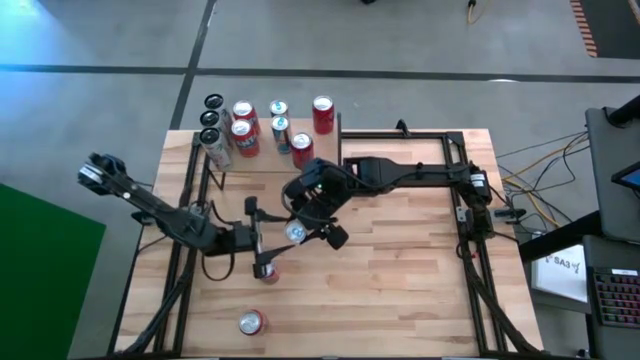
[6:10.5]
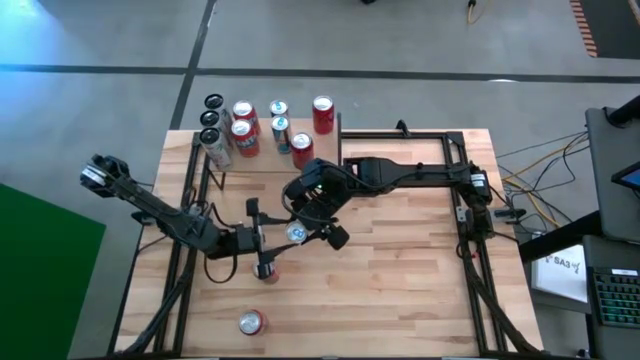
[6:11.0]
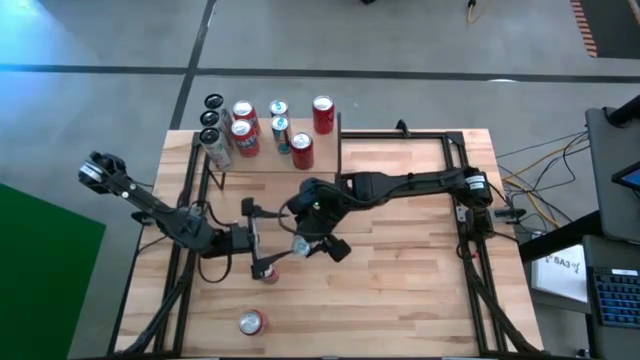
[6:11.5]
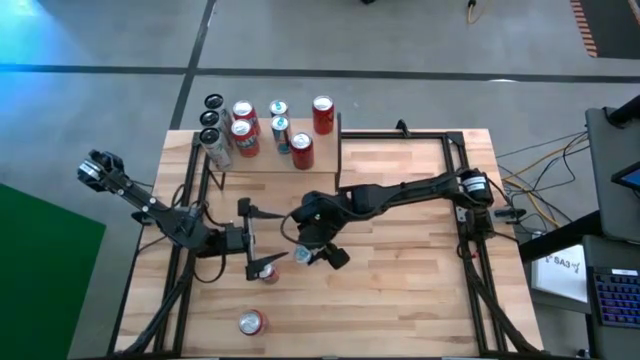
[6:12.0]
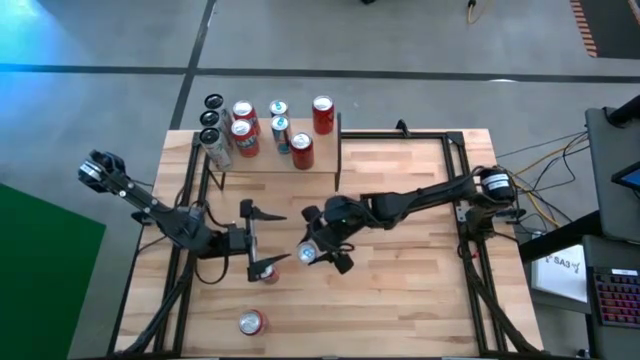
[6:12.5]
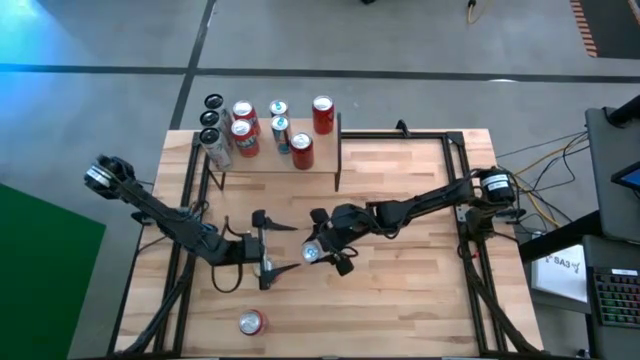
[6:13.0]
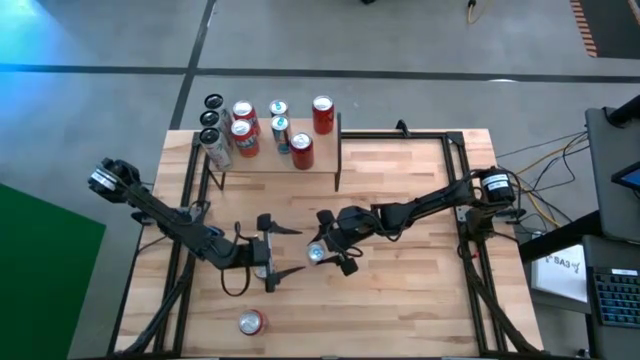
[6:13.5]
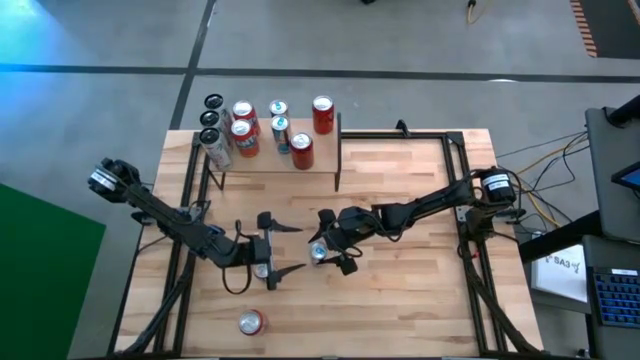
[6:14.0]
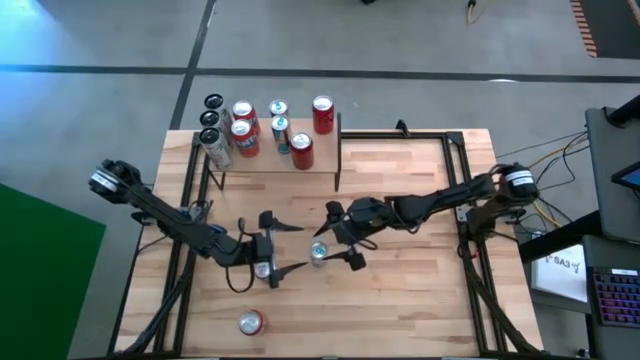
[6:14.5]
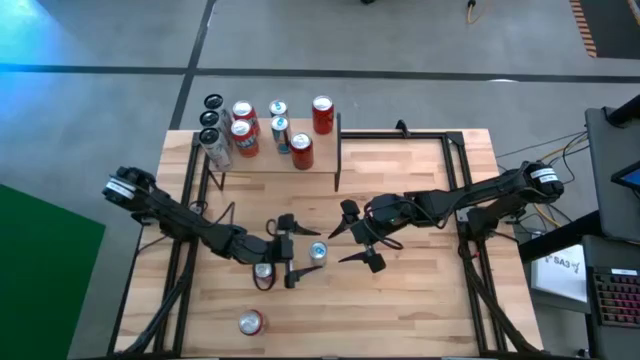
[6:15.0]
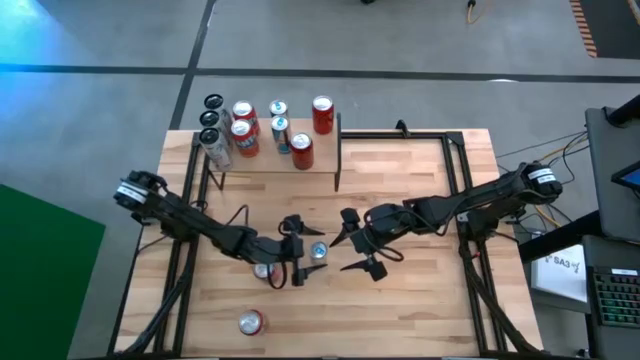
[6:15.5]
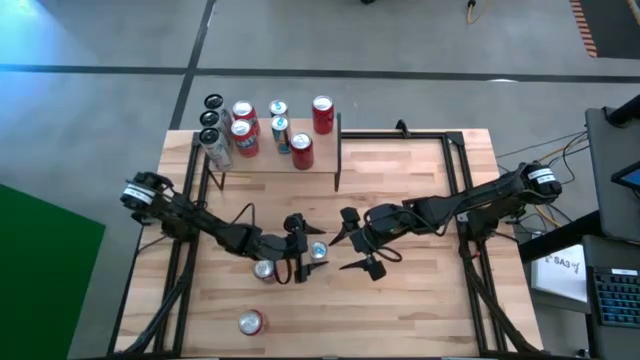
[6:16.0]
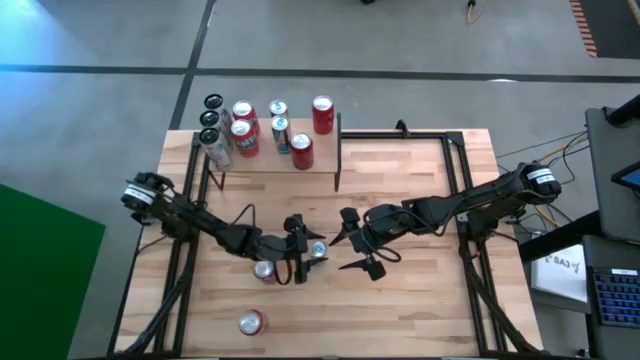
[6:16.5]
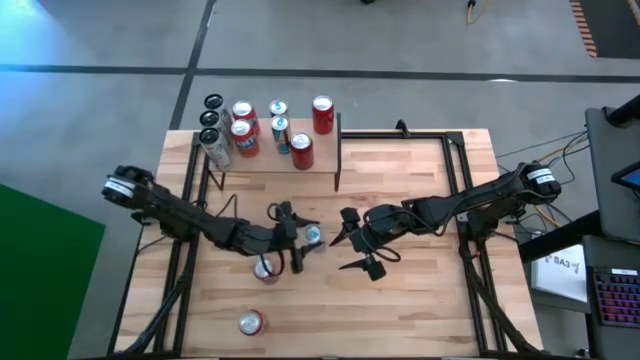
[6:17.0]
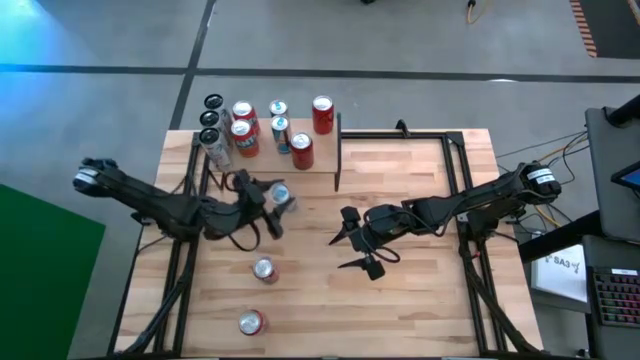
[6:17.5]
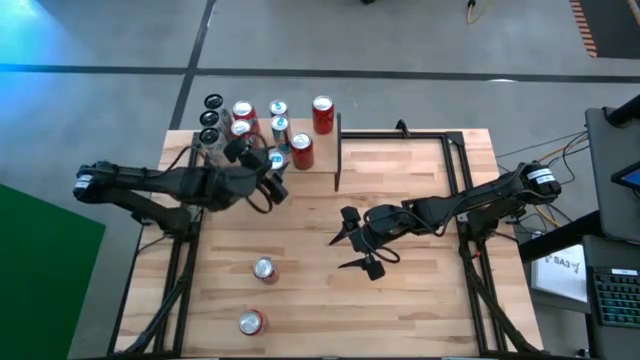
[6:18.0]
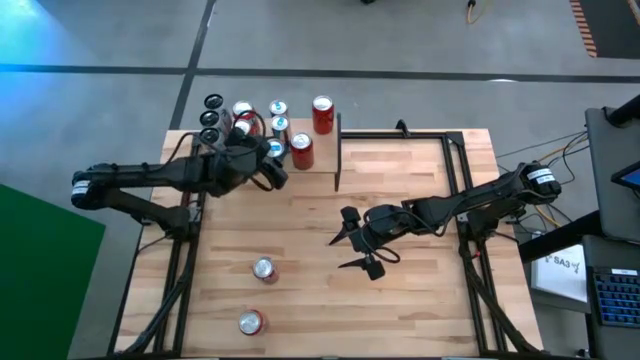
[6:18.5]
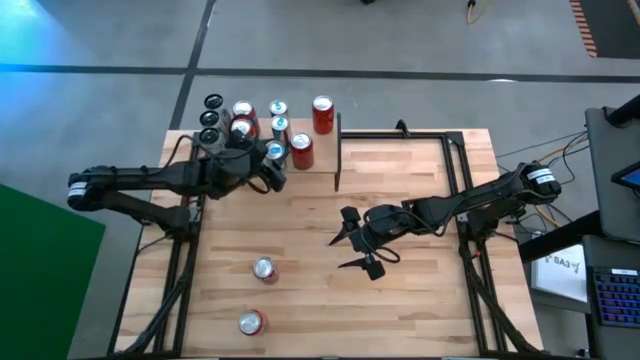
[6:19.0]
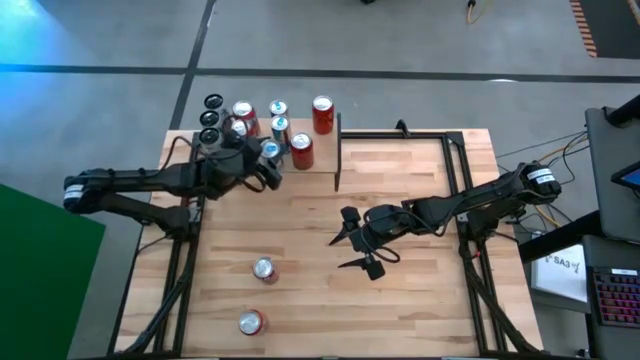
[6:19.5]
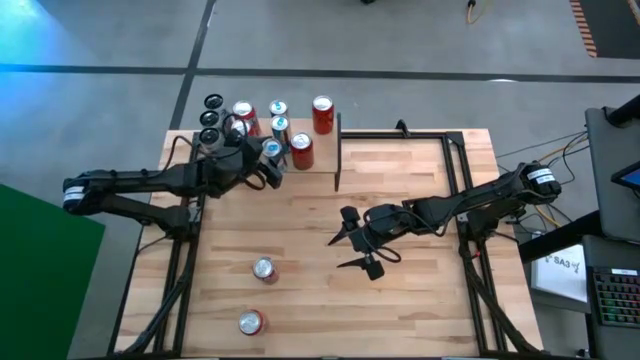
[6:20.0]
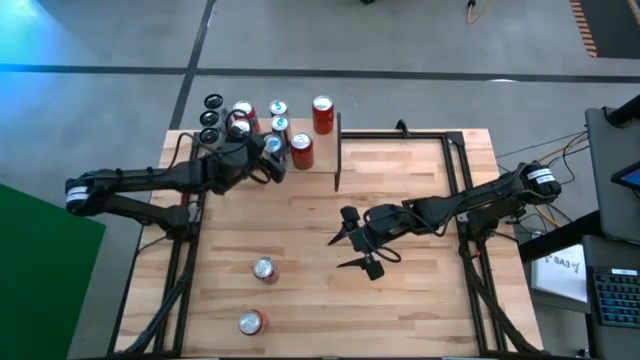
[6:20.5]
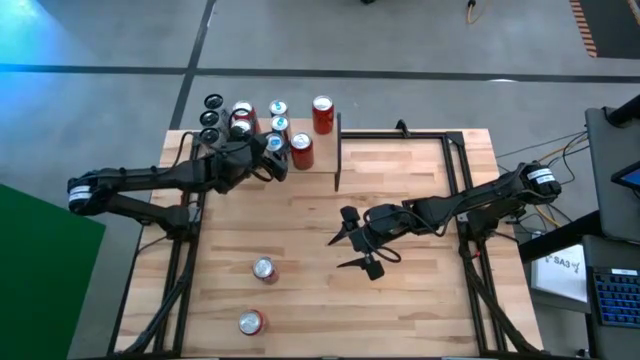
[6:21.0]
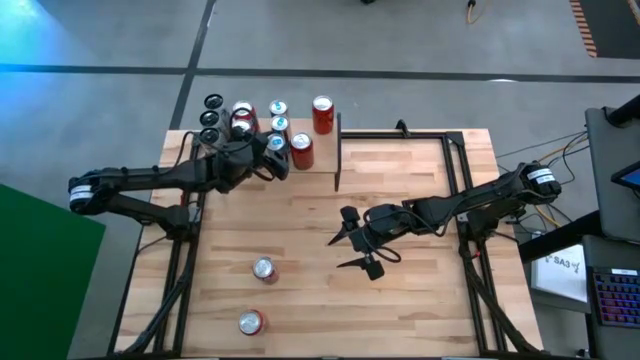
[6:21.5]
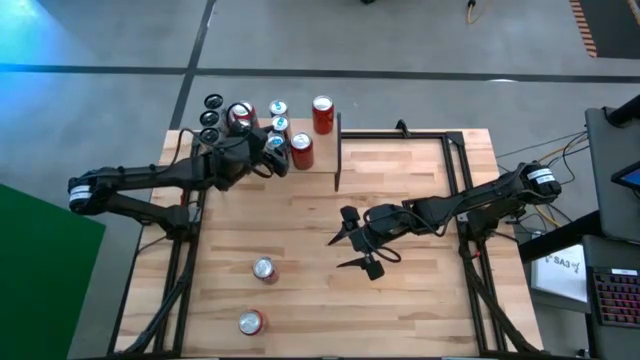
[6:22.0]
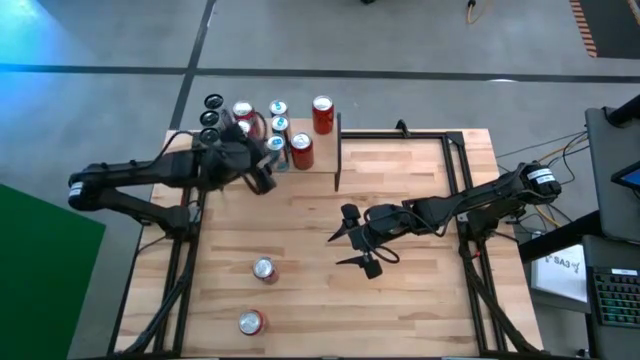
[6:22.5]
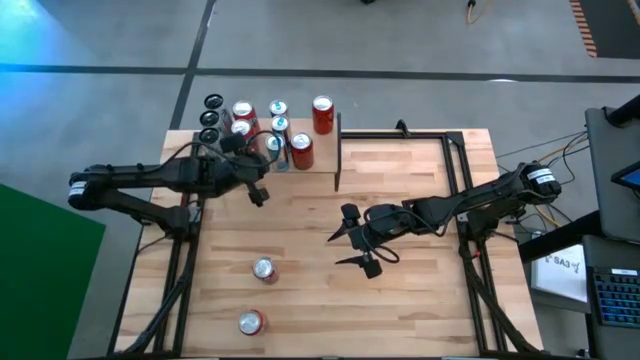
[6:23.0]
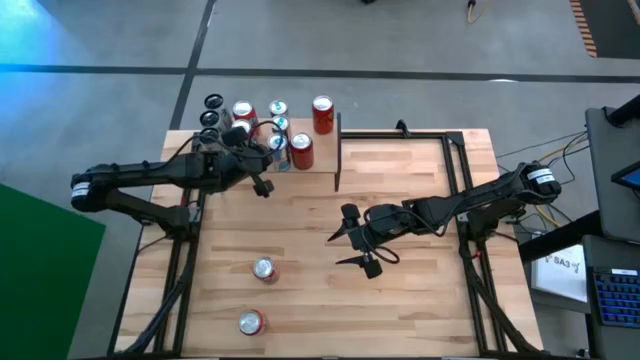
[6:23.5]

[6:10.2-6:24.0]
Task: Place canned beverage on shelf
Put the blue soda can on the shelf aligned with the other blue soda cans

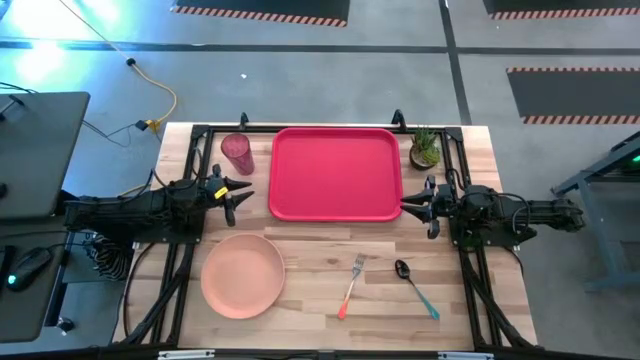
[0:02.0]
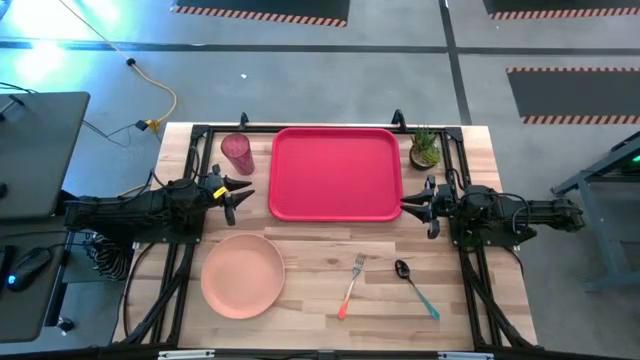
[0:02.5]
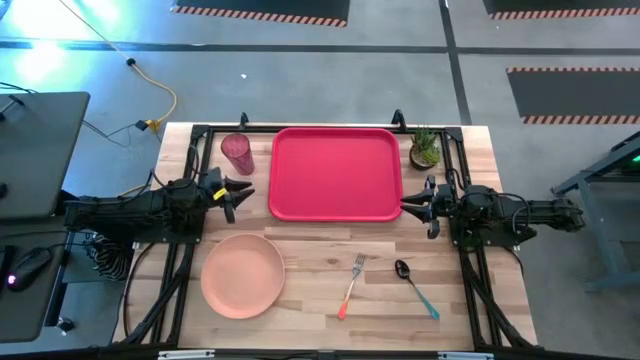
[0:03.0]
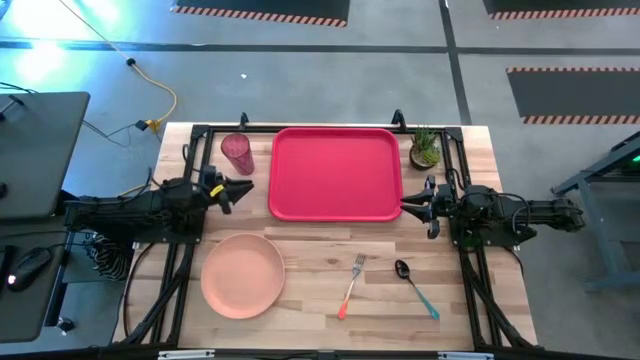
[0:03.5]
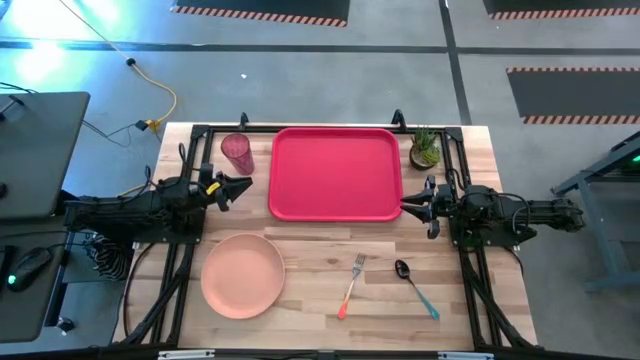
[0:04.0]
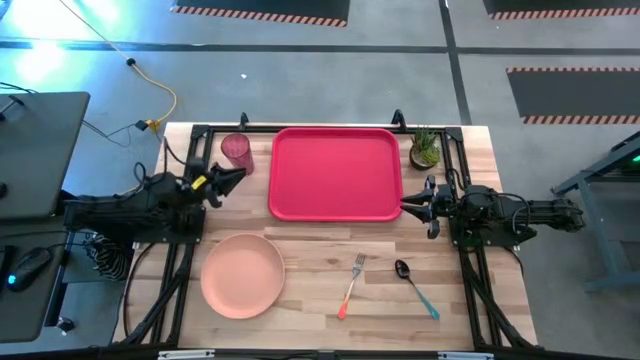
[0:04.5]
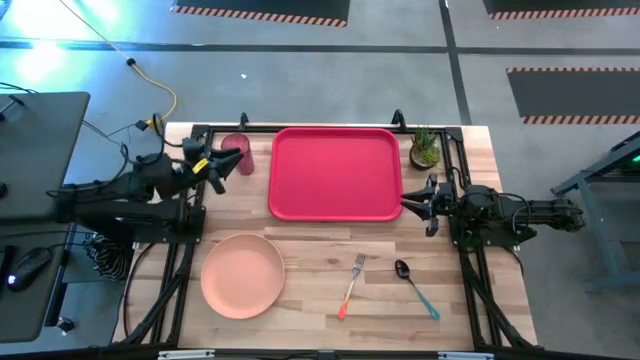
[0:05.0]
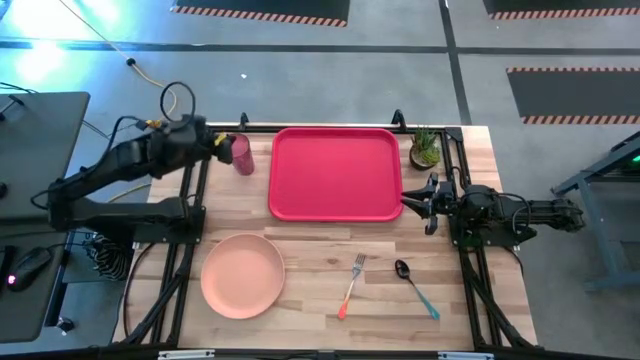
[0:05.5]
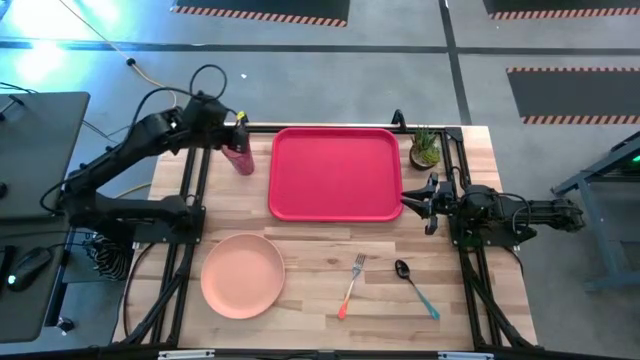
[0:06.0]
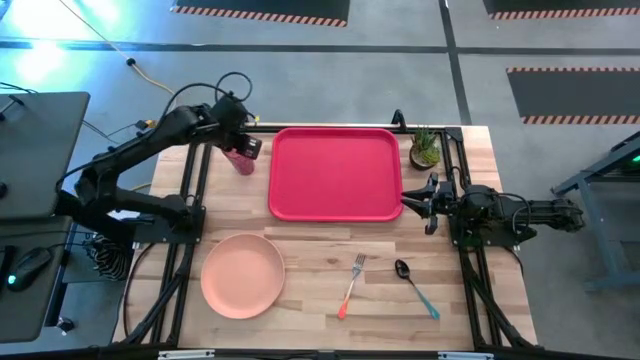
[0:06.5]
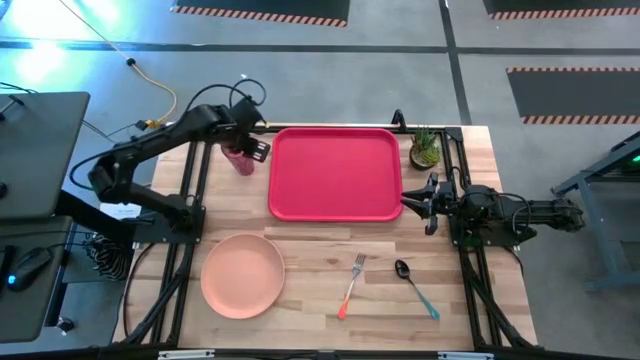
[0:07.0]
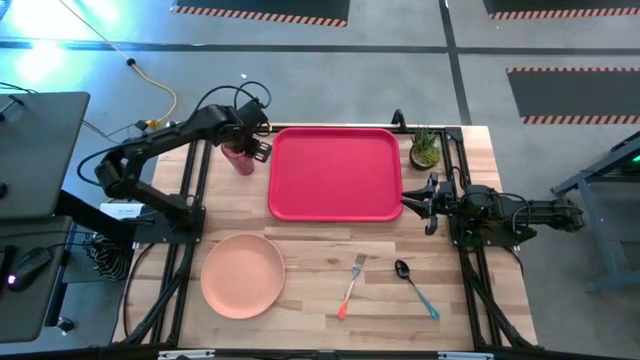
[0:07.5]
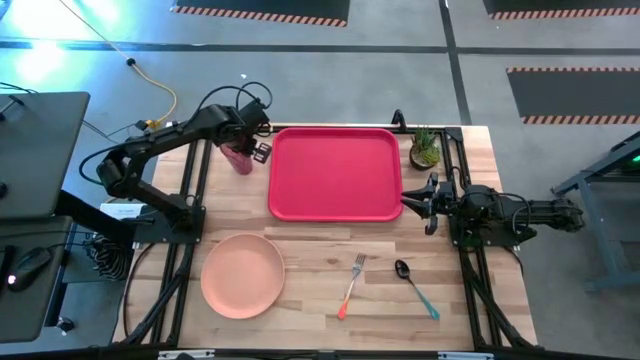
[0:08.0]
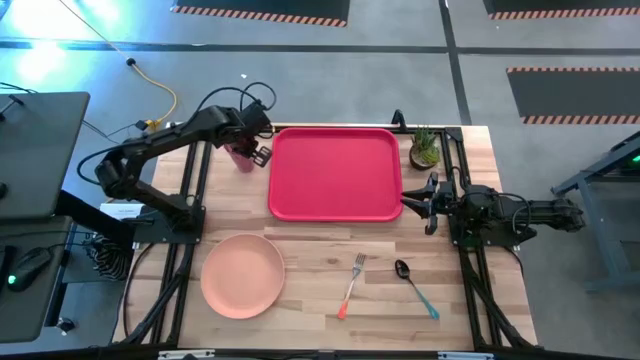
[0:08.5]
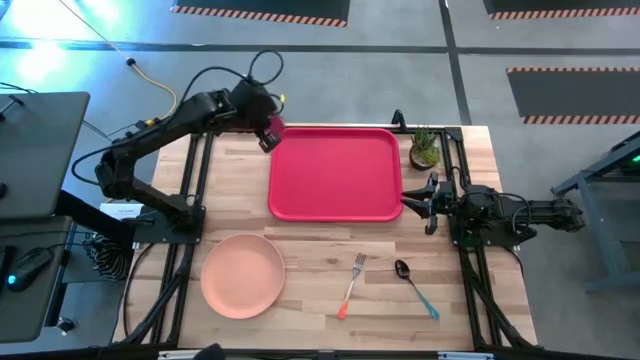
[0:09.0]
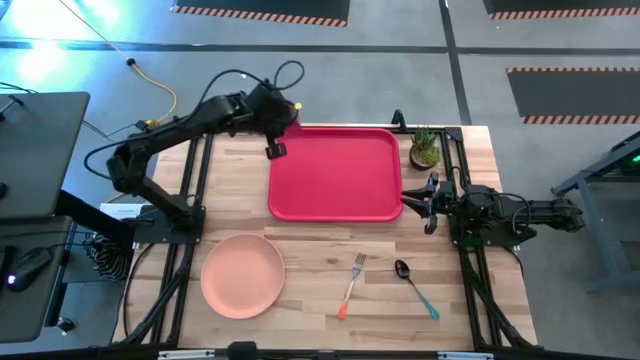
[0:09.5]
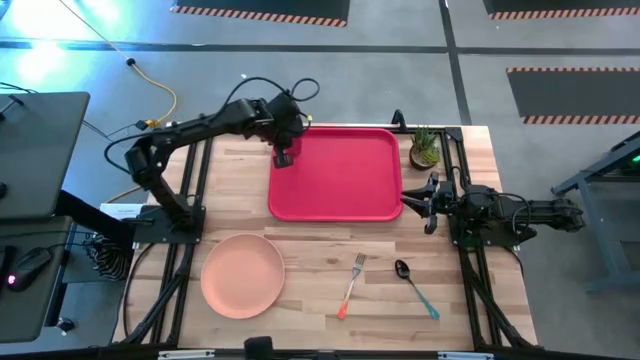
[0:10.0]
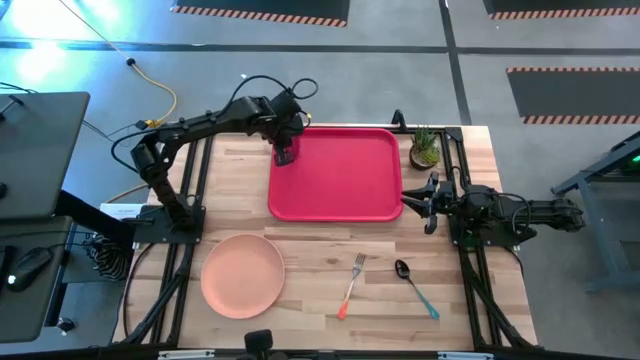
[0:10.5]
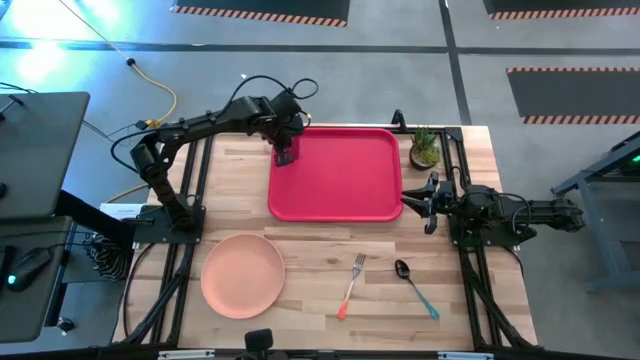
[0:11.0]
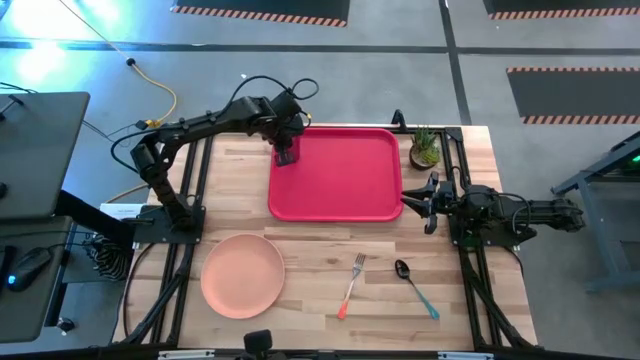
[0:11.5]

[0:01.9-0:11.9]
Task: Pick and place plate/cup/fork/spoon on tray
Put the violet cup on the red tray
